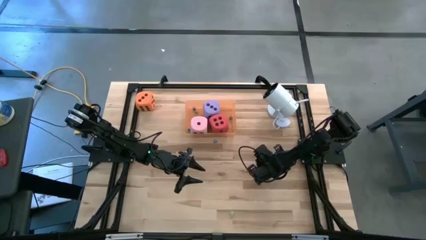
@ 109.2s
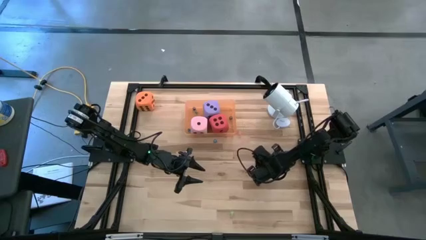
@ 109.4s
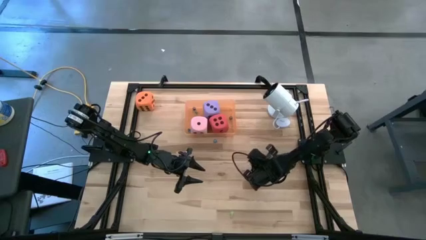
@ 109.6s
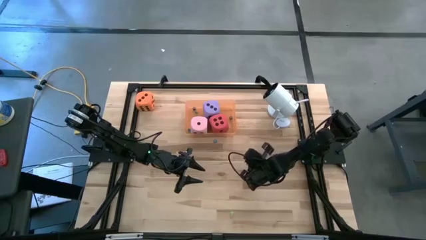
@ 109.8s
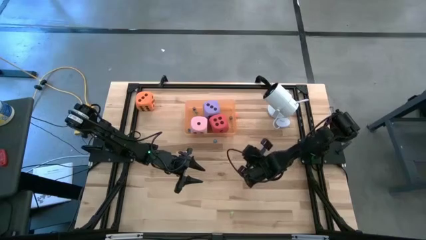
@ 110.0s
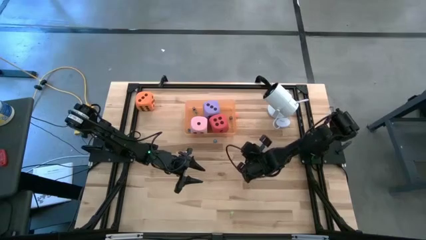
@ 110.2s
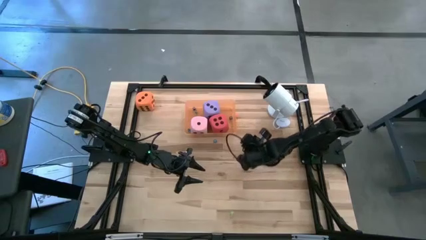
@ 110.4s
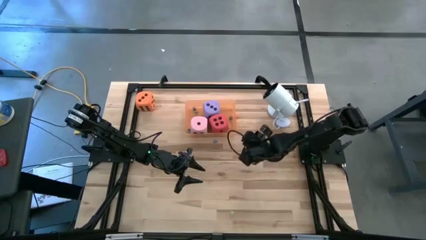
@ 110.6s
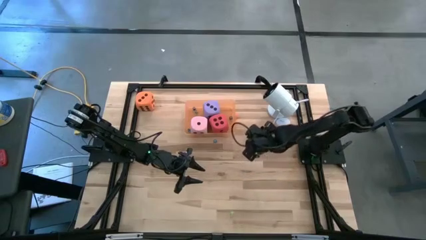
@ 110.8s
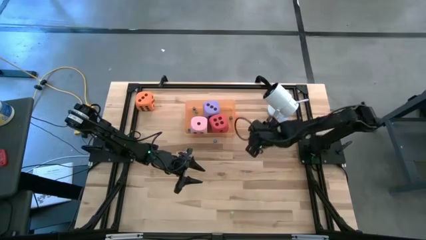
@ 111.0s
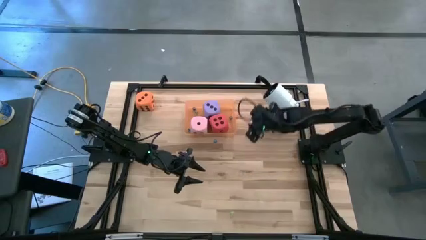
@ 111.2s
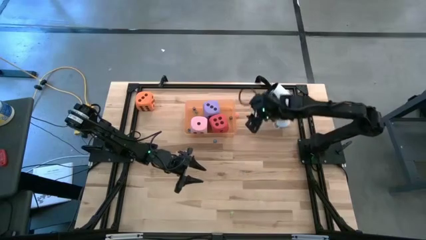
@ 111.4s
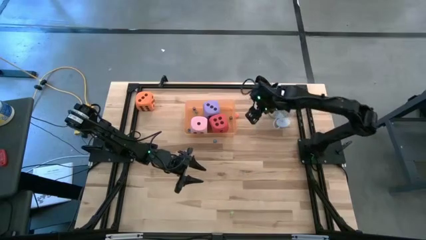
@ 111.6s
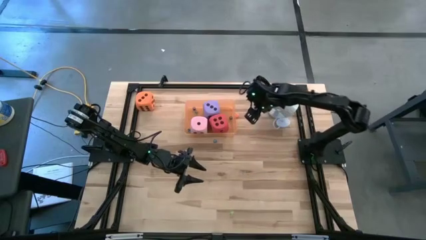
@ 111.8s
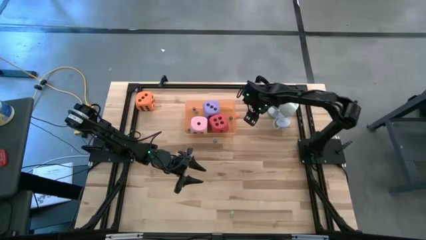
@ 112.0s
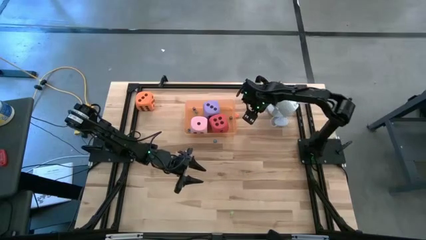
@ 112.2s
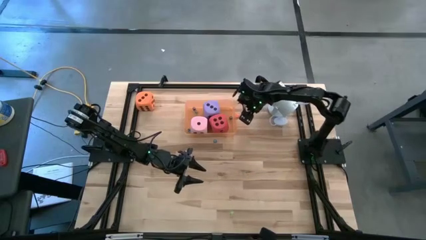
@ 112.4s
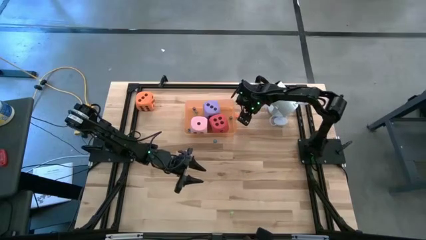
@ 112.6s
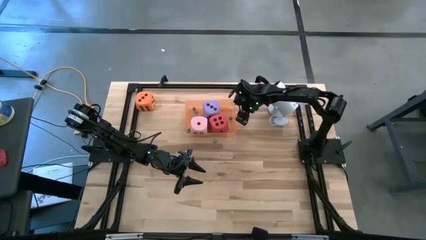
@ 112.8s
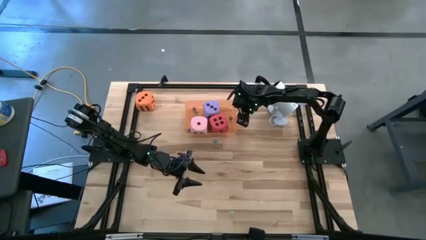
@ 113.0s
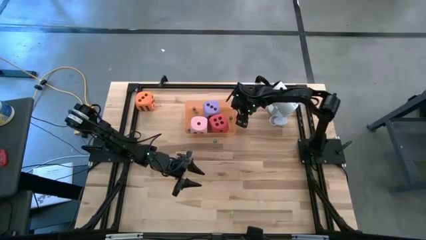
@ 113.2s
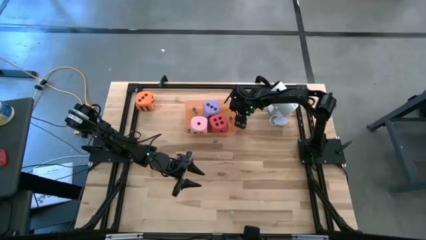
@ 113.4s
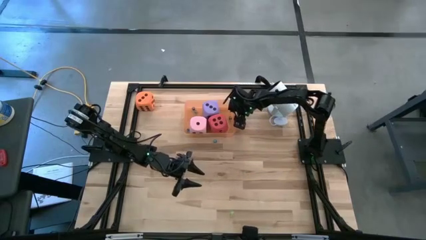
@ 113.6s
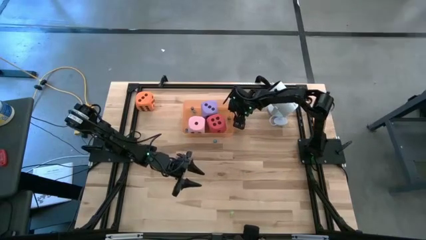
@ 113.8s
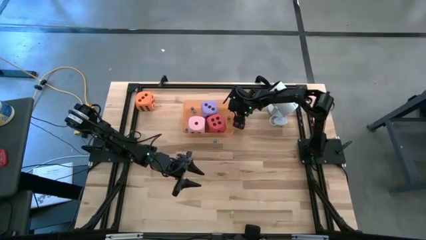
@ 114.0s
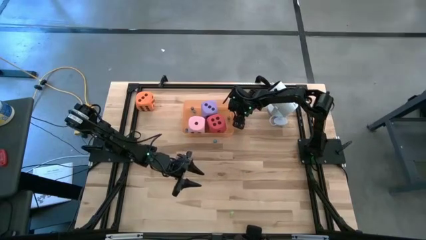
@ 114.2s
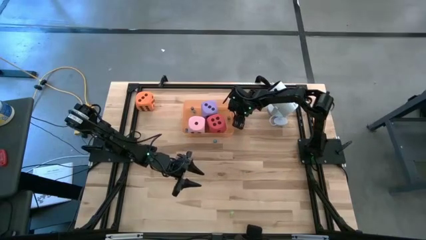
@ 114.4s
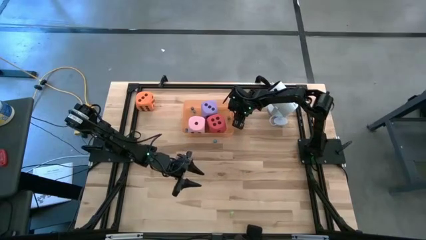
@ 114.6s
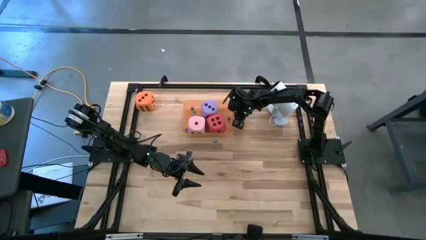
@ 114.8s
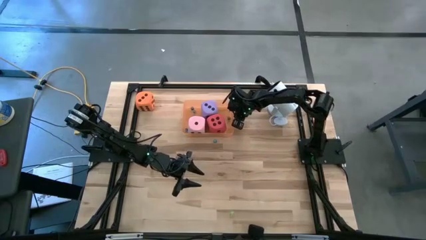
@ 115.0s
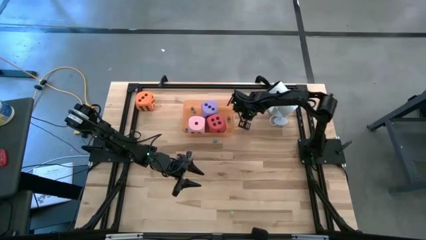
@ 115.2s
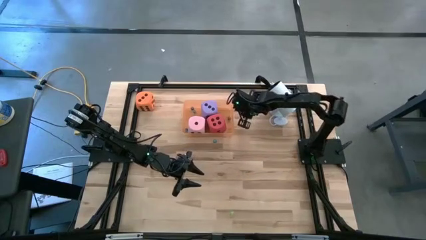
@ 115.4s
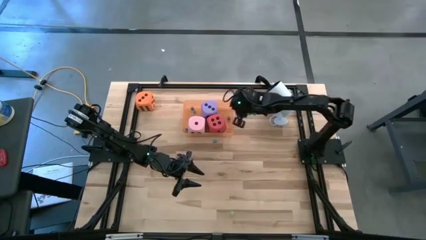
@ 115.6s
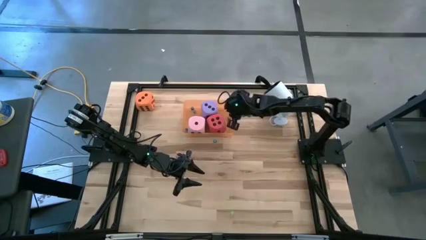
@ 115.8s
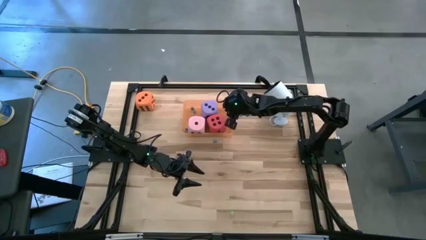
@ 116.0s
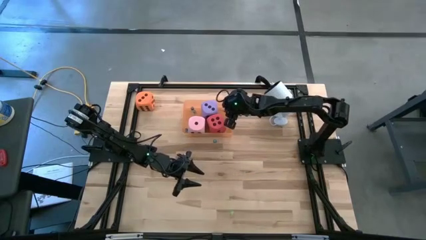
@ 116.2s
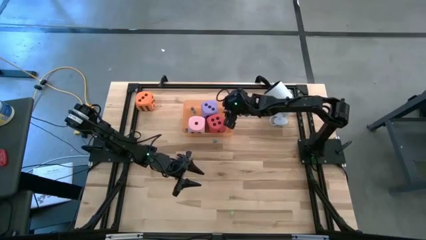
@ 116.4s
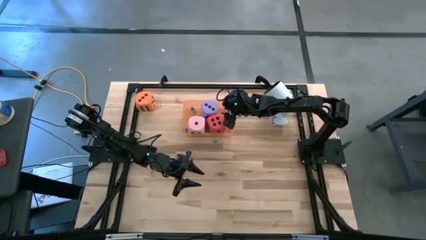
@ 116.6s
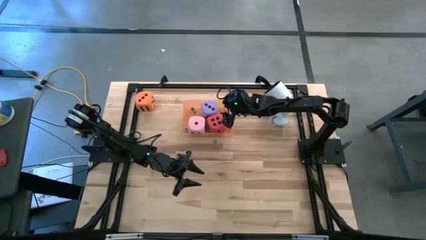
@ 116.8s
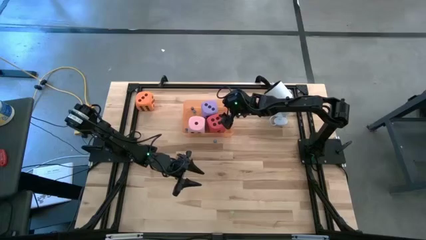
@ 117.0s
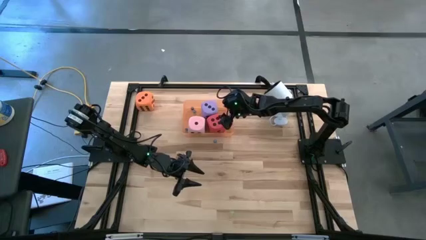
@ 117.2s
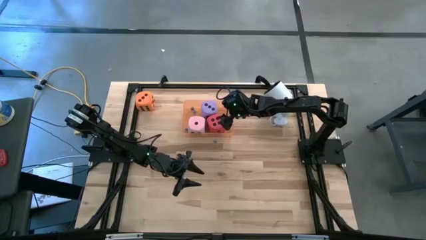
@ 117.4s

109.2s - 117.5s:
Task: Pick & Place Dice
Put the small orange dice in the orange bin

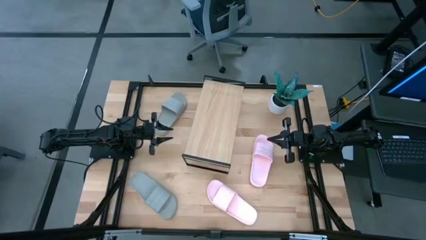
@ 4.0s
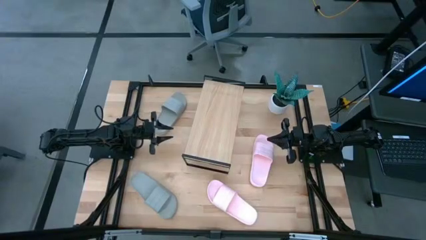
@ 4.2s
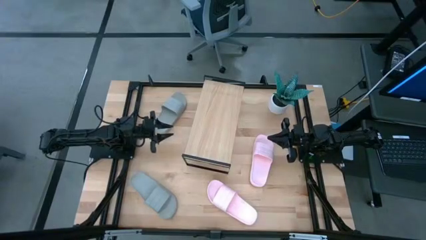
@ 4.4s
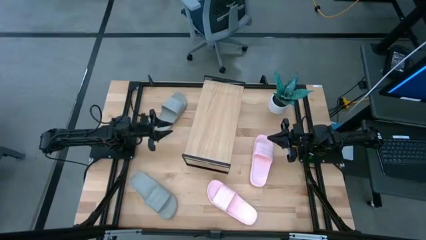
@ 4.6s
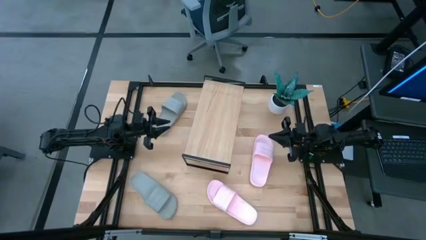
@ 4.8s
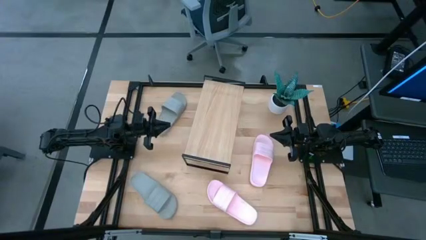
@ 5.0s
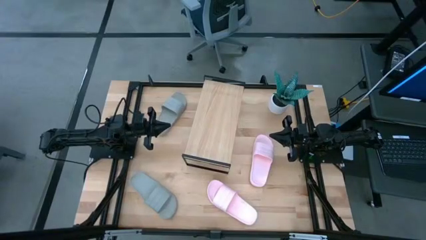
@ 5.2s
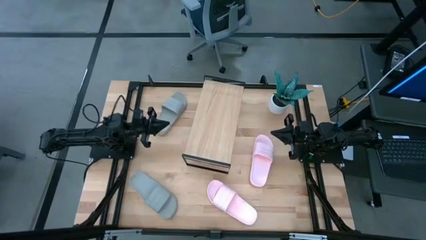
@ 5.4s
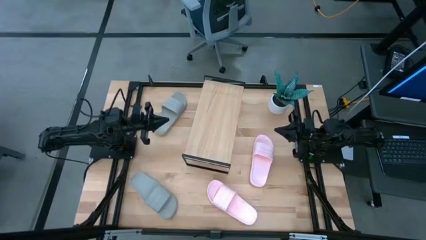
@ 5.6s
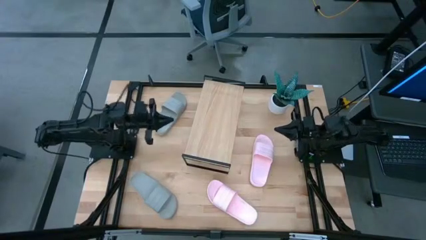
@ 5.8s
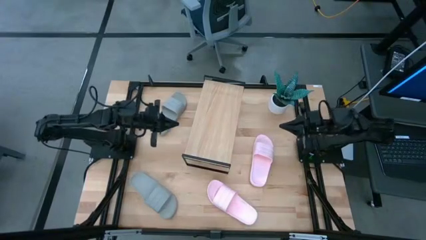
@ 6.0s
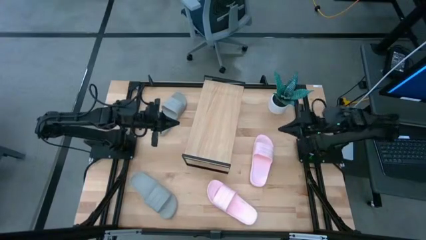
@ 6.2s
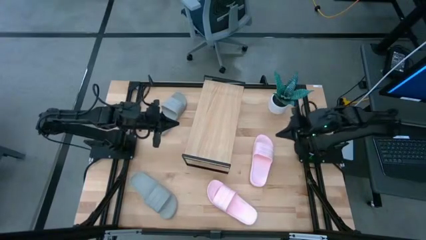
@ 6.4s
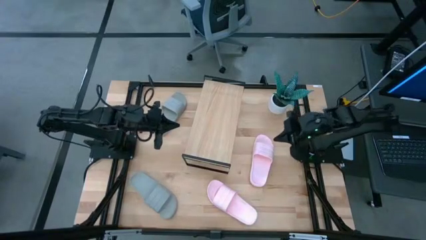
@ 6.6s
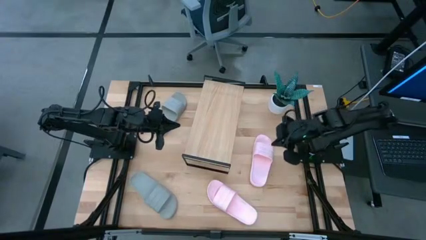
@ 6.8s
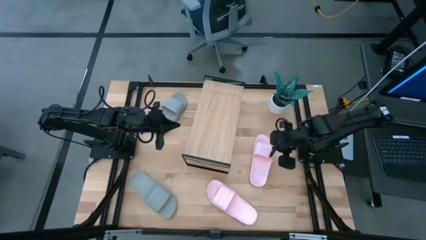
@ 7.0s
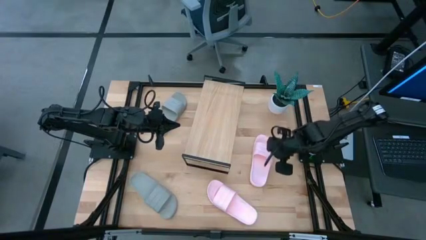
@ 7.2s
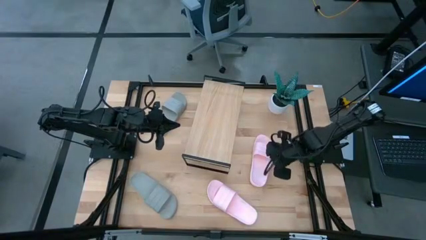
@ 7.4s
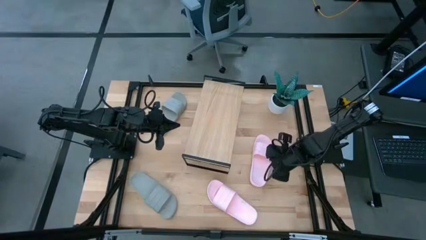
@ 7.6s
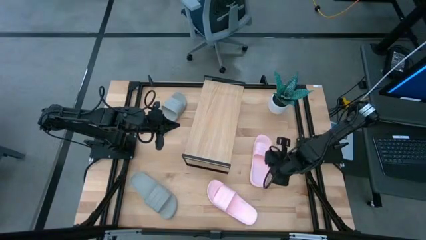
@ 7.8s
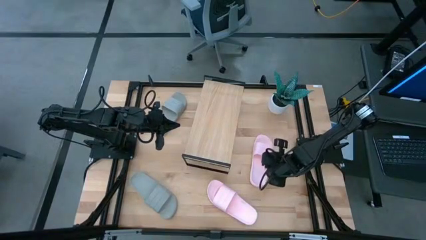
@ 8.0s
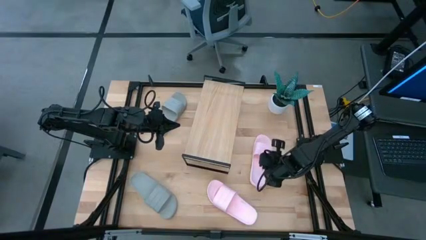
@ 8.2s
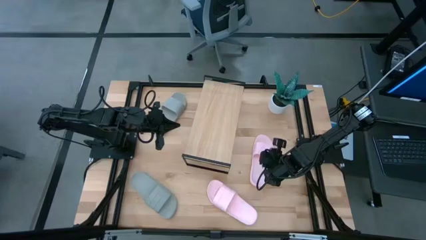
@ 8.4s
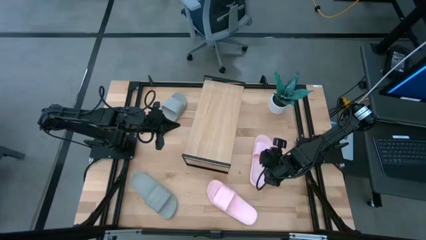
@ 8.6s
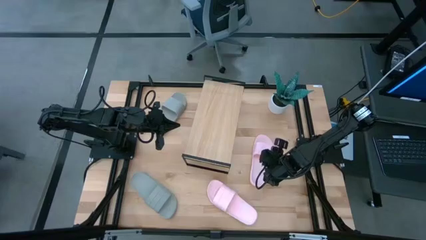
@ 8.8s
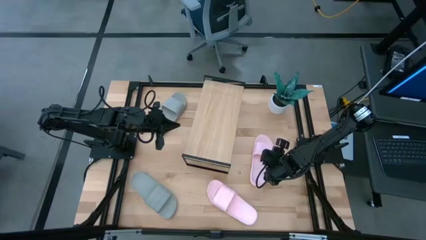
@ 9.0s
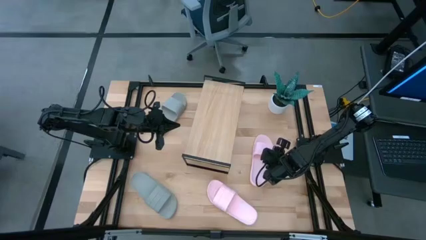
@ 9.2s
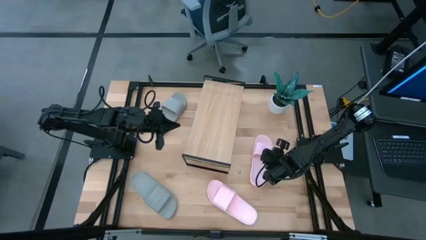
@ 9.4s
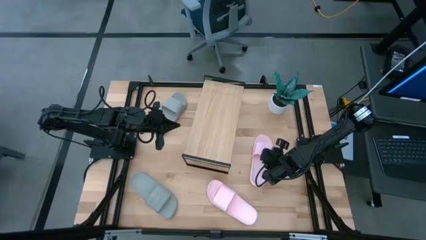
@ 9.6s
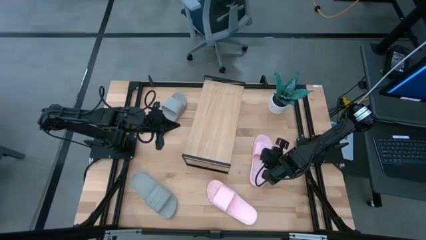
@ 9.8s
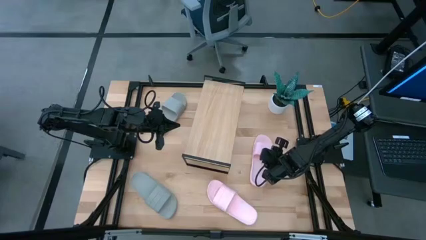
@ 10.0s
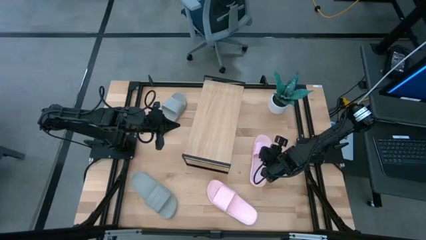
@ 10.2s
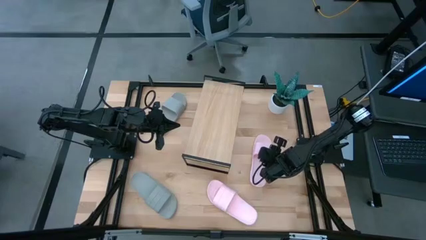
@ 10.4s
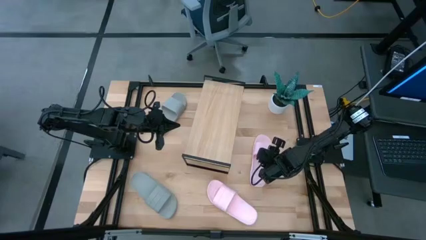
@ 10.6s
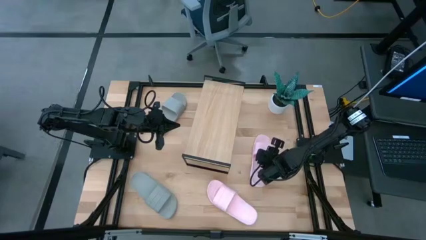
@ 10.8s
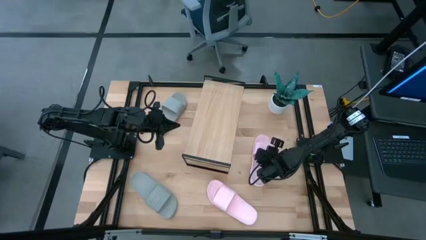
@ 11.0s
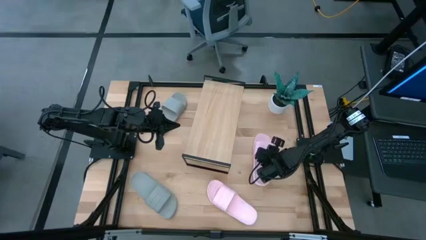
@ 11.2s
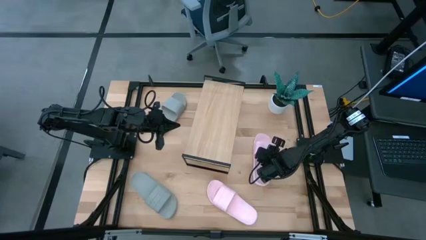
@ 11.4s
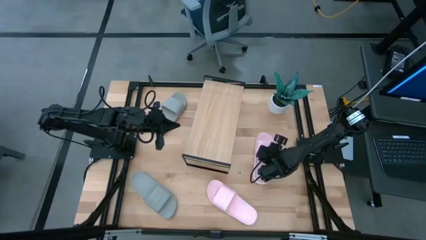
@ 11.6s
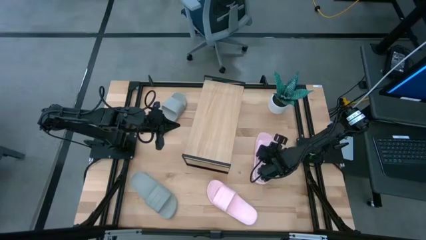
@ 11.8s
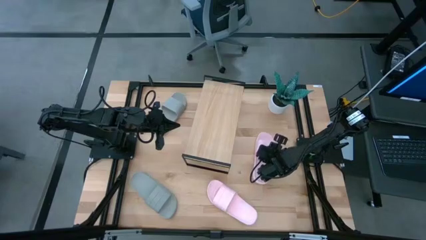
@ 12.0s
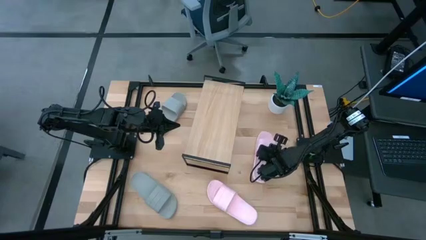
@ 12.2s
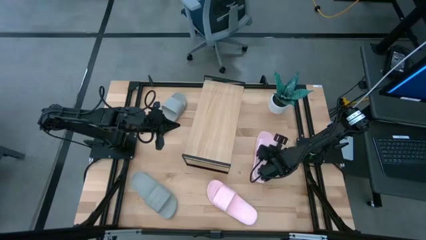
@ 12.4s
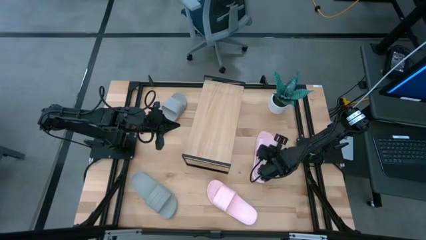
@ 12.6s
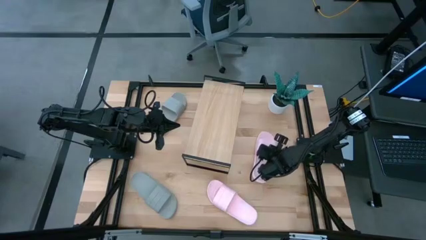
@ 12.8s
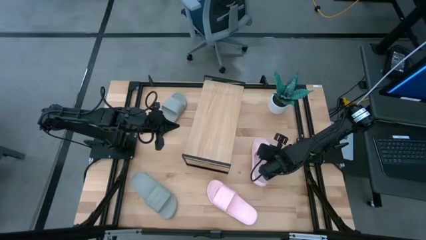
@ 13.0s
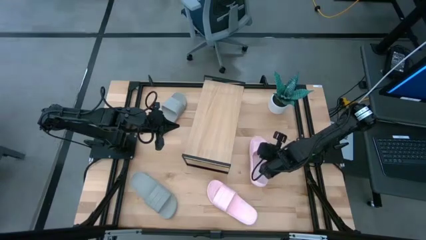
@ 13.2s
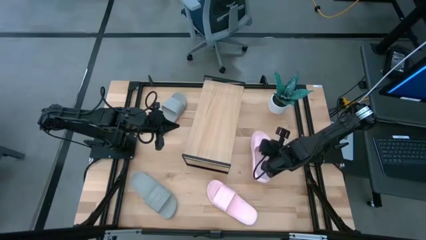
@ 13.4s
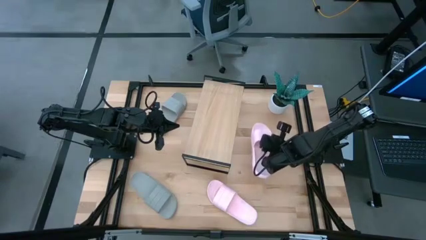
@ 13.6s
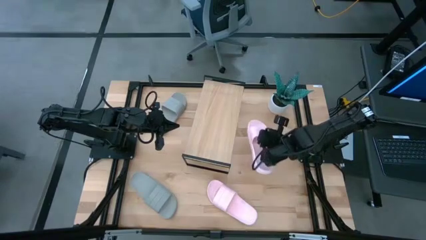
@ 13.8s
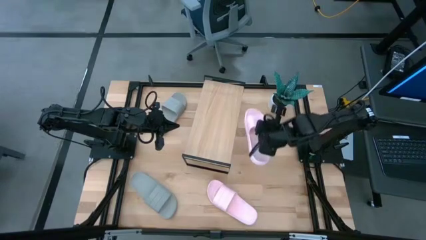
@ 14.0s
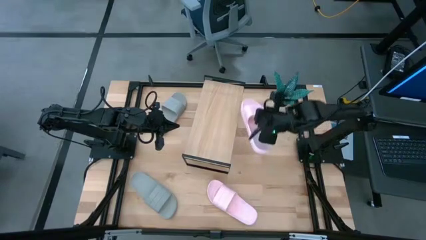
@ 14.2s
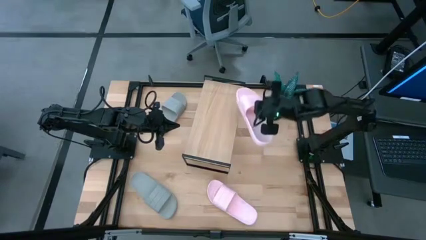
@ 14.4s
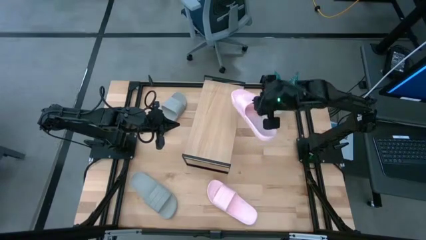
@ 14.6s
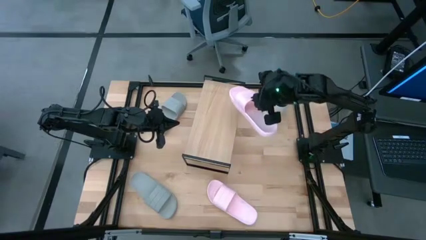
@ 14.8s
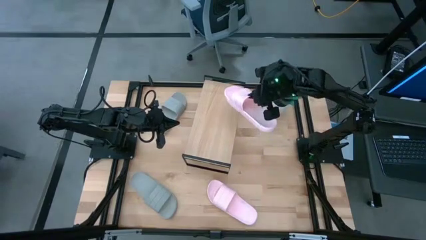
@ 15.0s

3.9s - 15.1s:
Task: Pick and place slides into the shelf
Put the right pink slipper on the shelf
